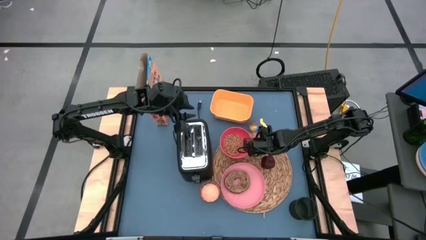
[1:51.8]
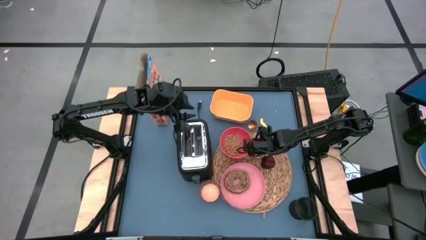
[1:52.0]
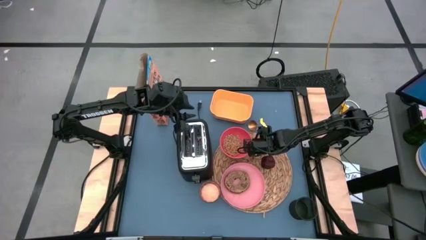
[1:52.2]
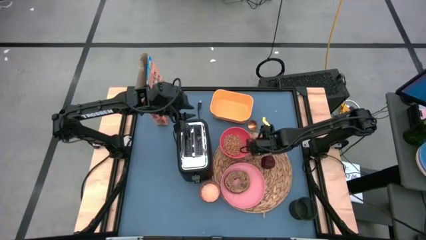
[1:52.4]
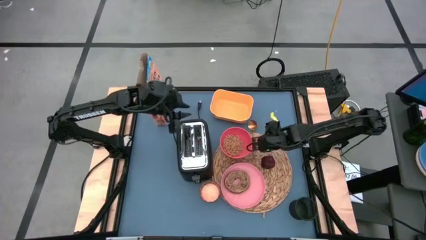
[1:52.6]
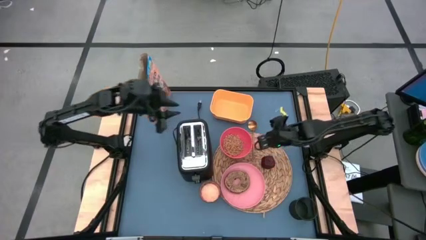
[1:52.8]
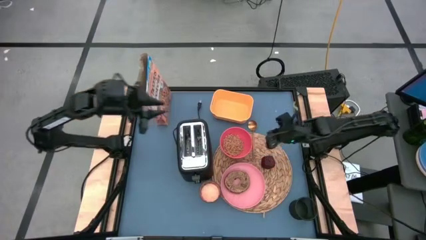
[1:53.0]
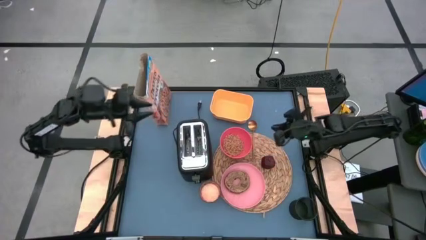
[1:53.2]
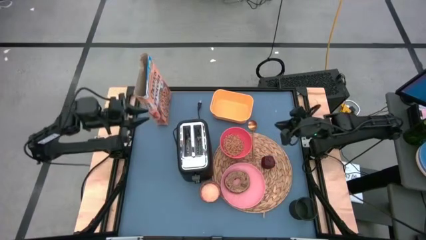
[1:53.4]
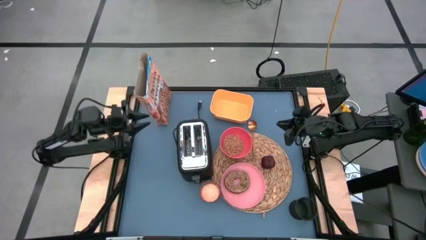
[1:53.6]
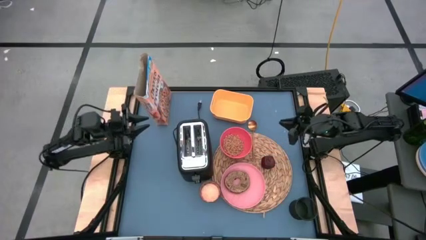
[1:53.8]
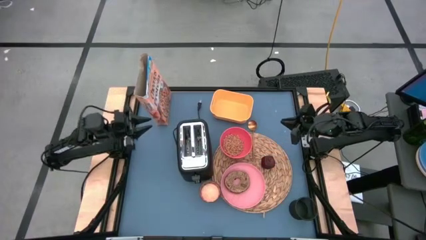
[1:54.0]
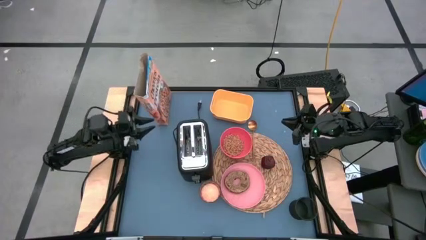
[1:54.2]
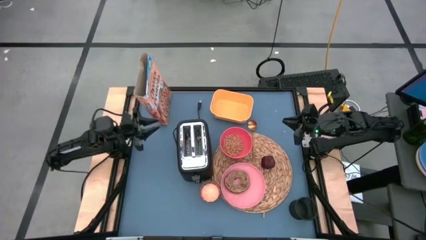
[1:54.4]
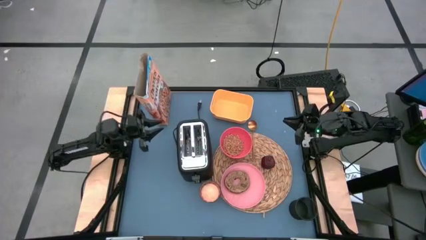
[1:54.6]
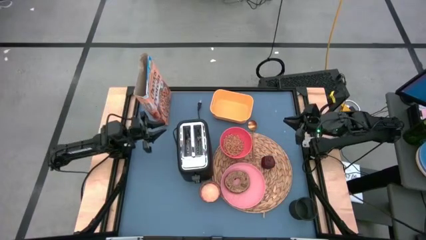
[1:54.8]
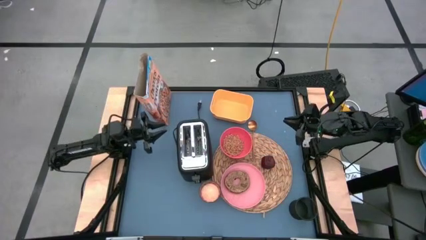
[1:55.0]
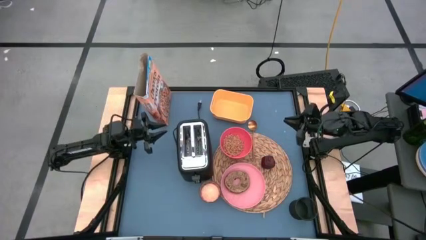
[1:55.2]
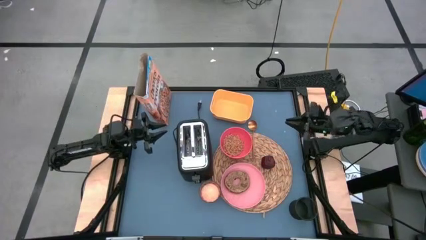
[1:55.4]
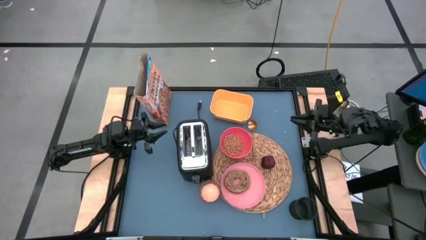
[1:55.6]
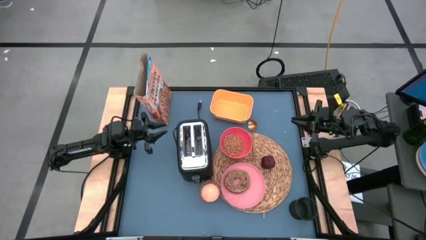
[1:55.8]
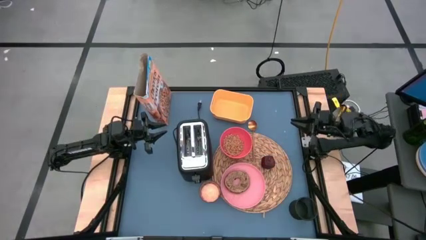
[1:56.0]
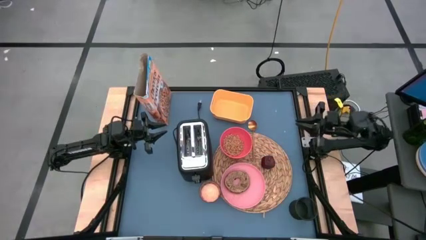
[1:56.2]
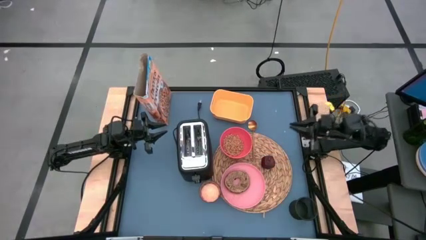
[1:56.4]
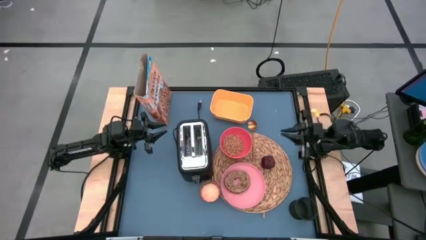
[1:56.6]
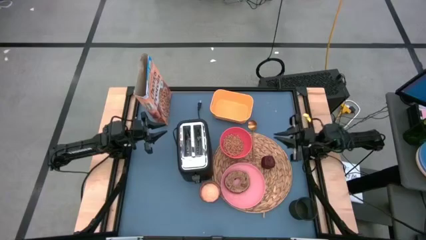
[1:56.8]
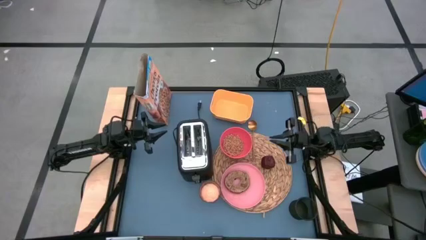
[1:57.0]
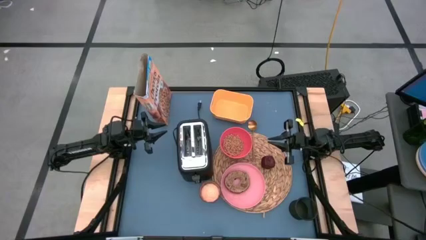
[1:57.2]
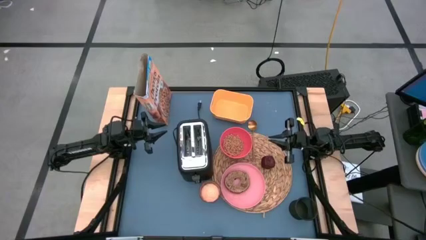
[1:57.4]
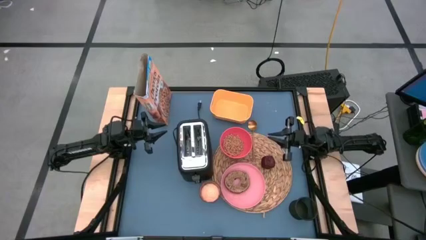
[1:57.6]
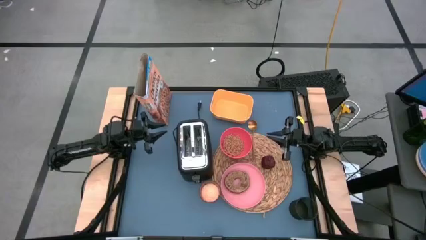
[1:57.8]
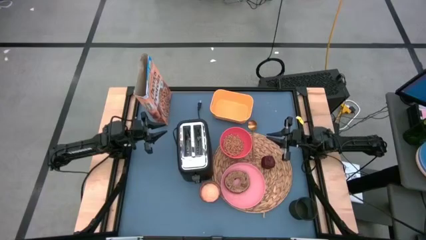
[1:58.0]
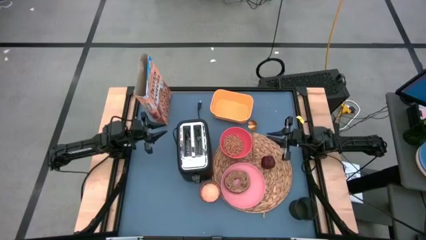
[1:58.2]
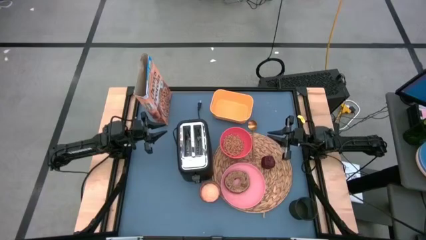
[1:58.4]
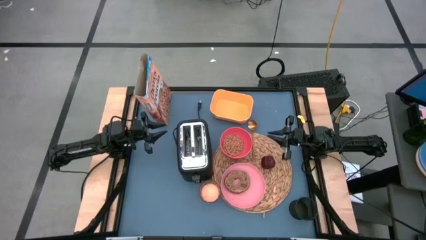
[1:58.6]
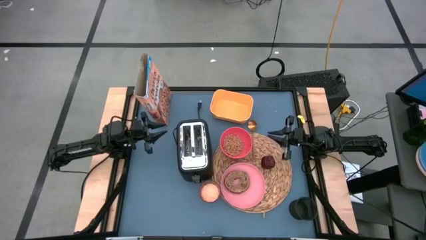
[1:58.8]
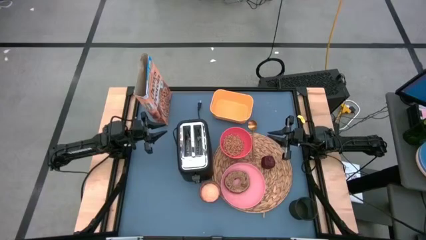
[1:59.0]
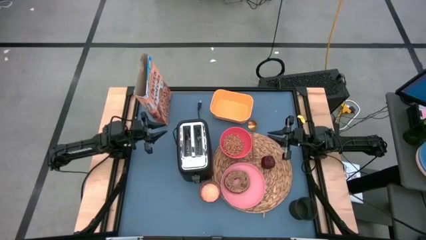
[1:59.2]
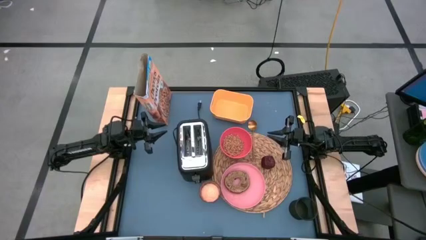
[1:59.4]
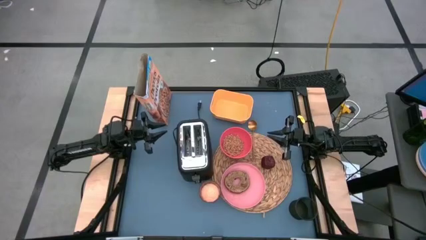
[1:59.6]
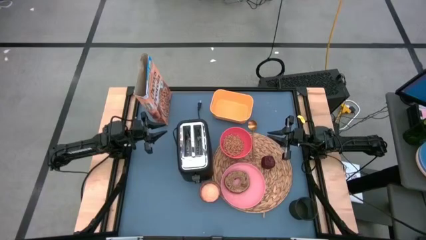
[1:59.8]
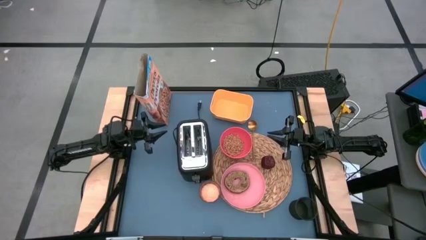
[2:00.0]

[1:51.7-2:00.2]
Task: Arrange a breakfast setting
Return to Home Position
